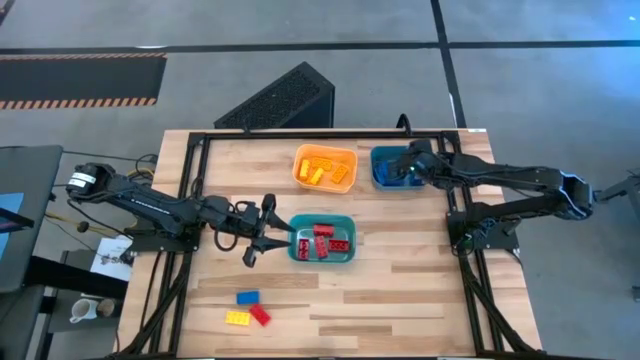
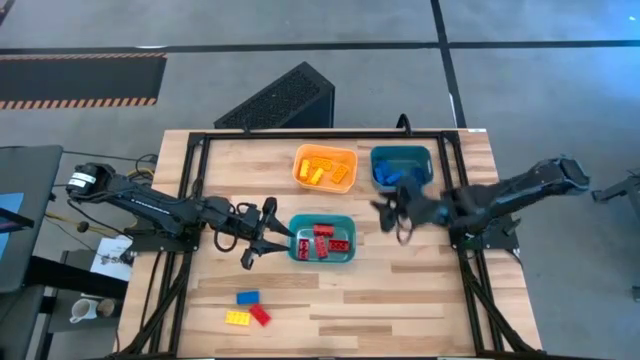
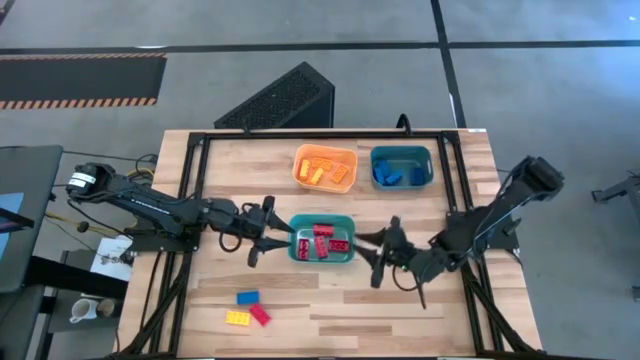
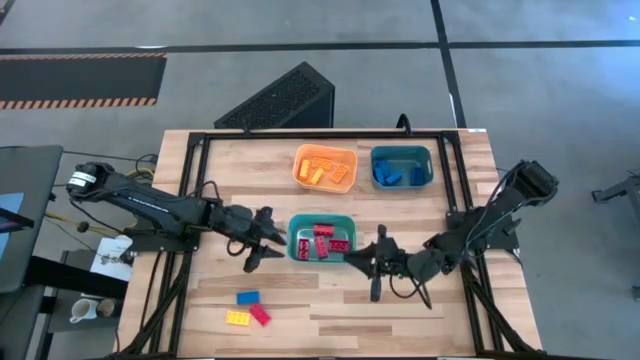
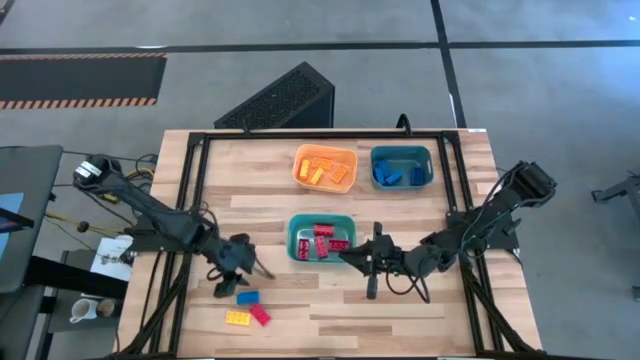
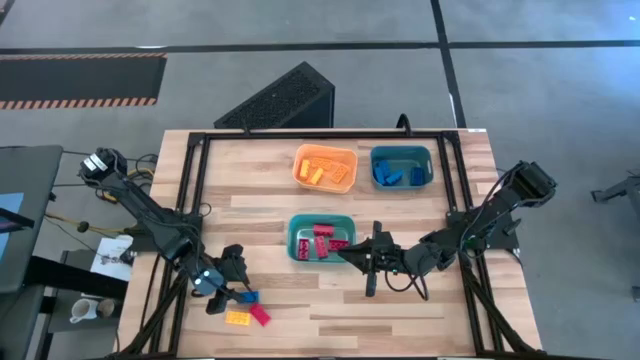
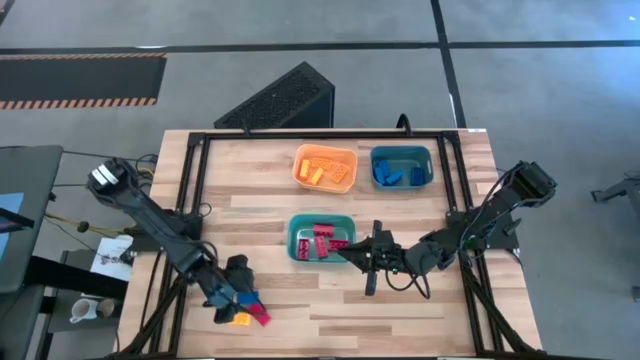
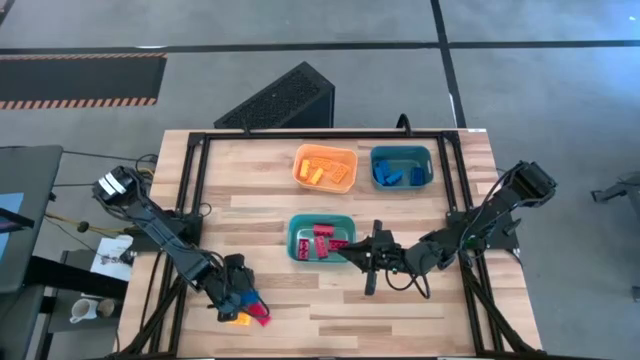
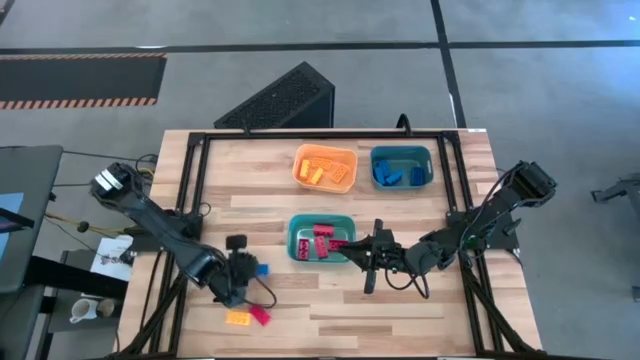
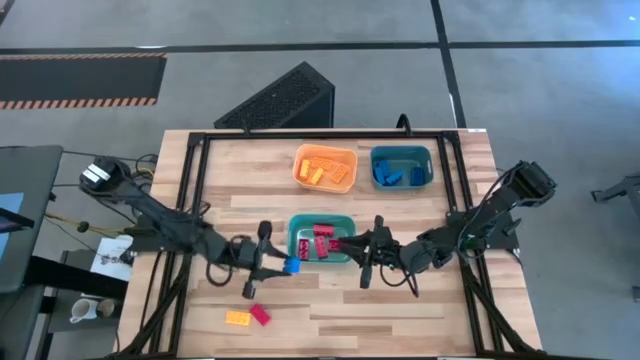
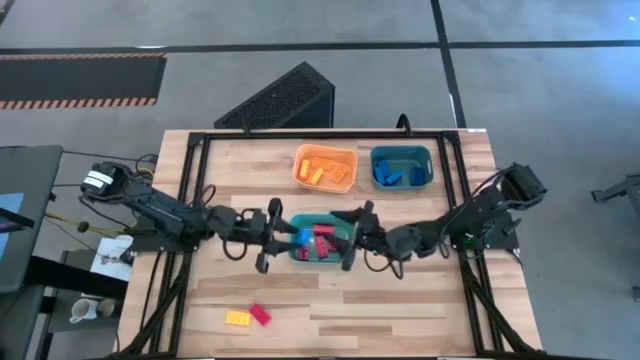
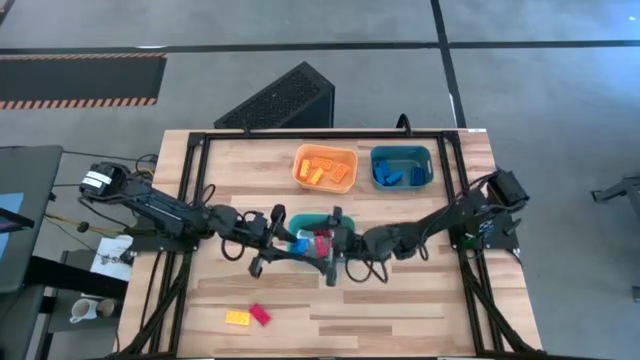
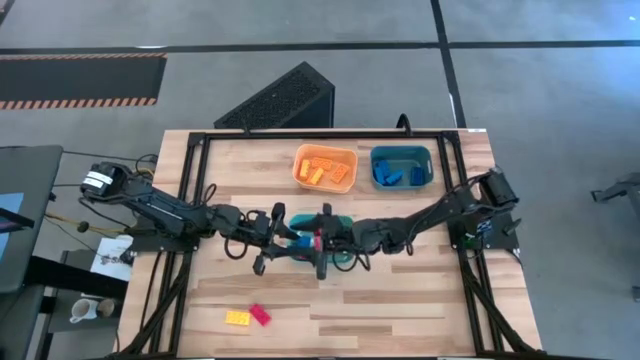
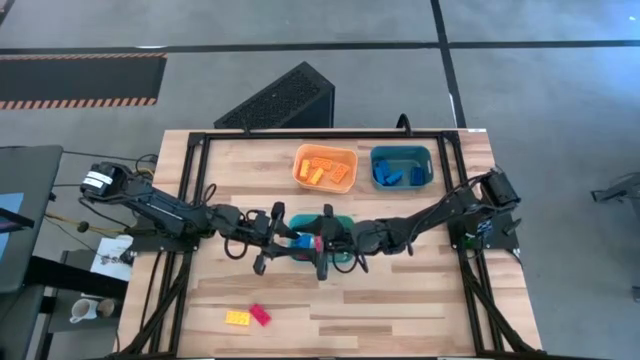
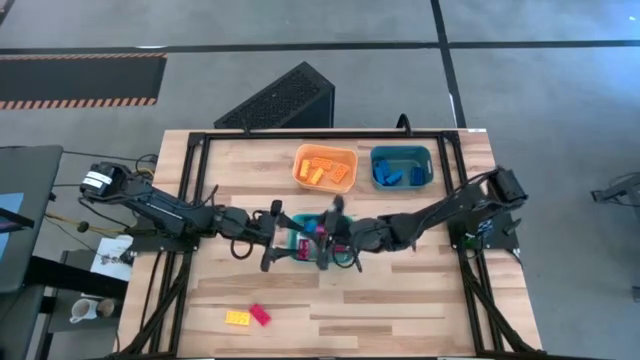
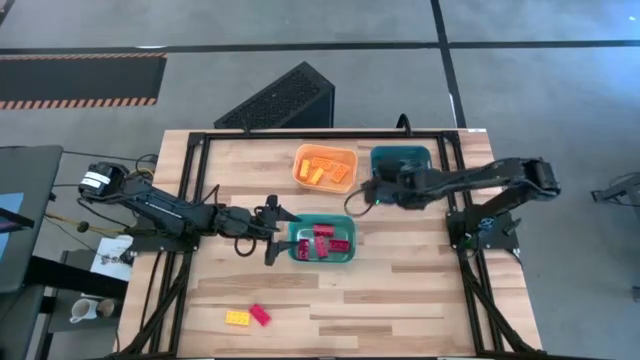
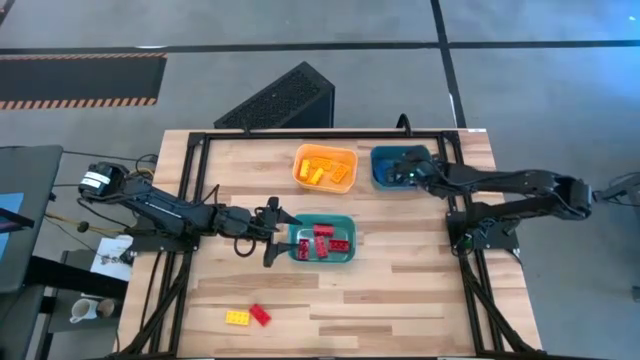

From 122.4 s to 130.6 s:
Task: Sort & place blocks by color
Put the blue game piece into the blue bin

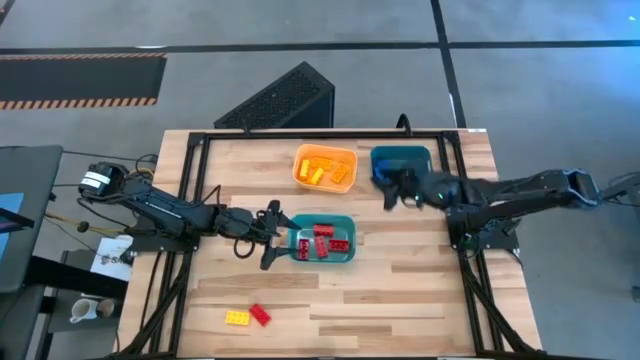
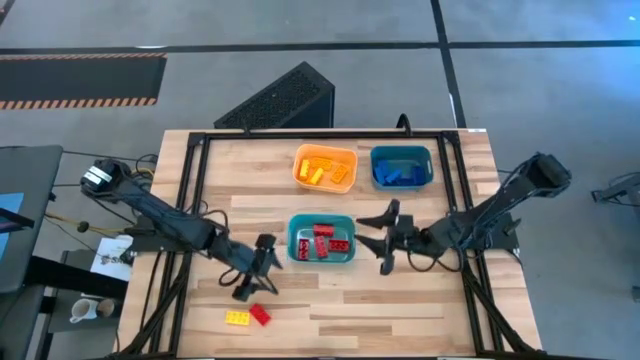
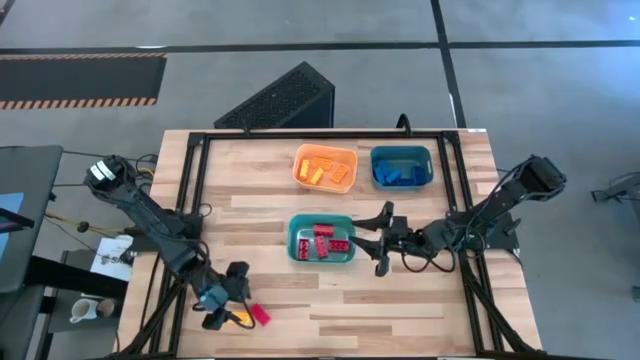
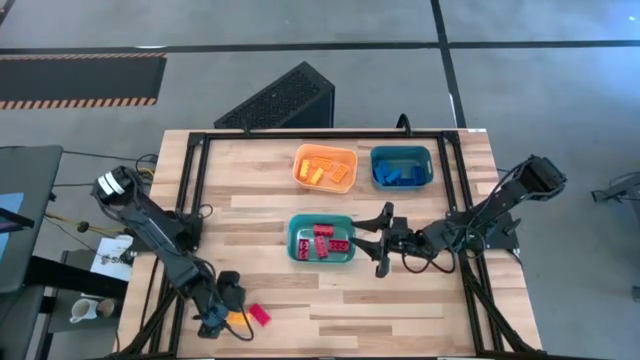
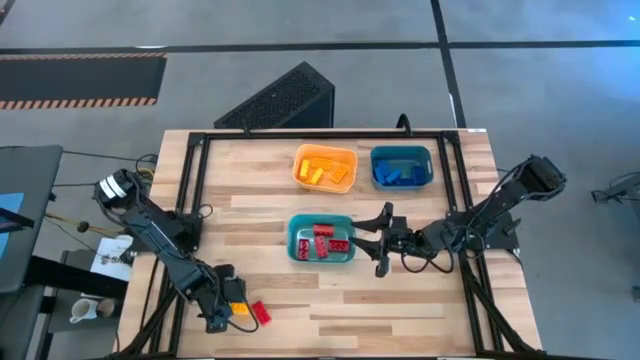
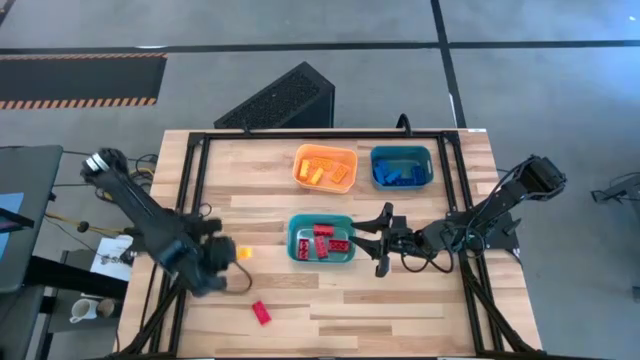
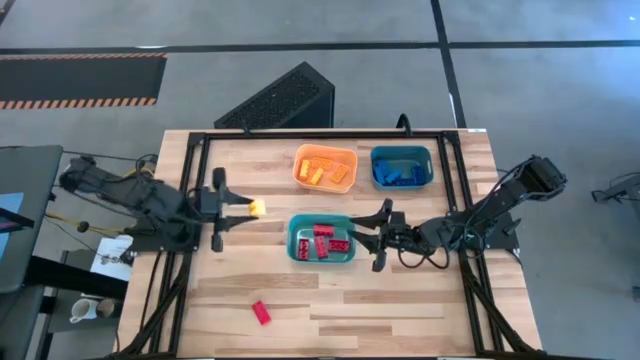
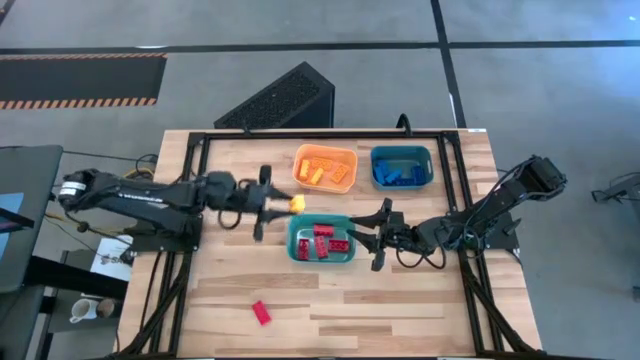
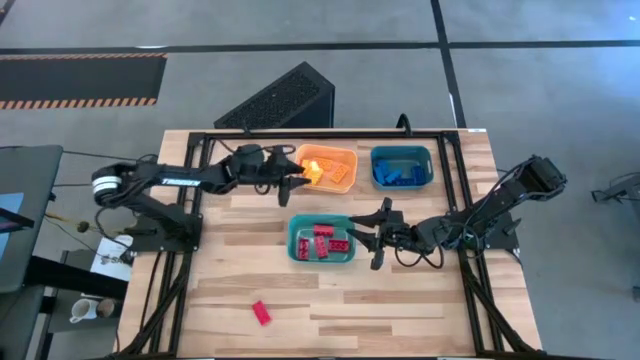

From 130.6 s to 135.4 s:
Put the yellow game piece into the yellow bin

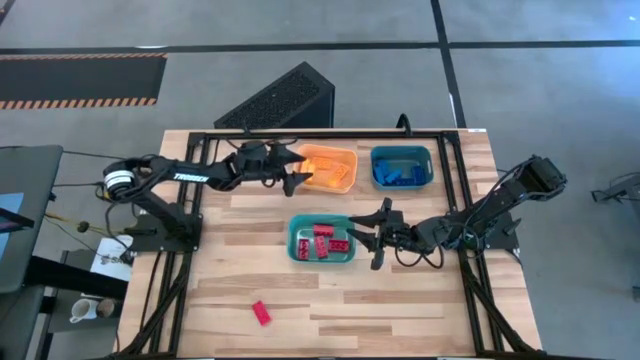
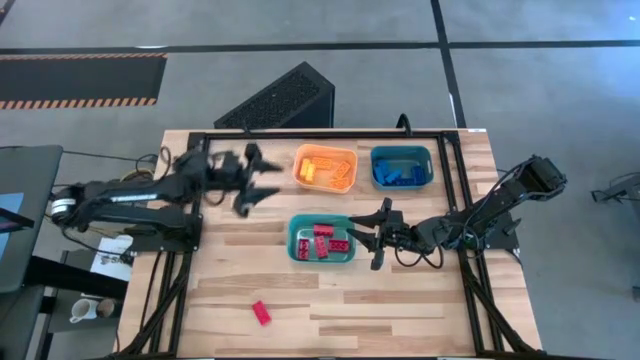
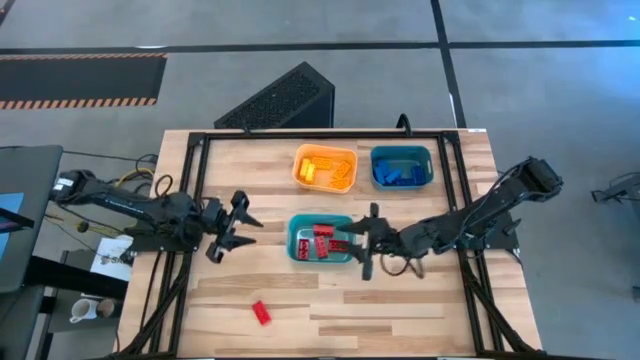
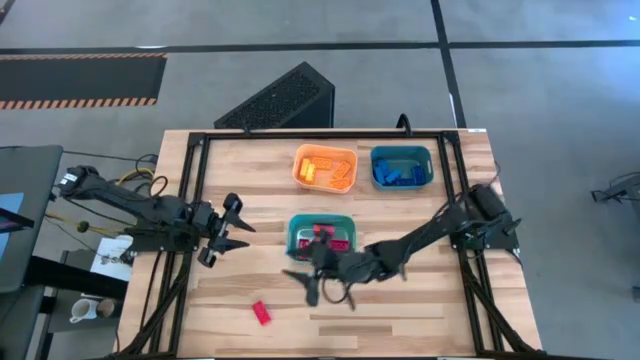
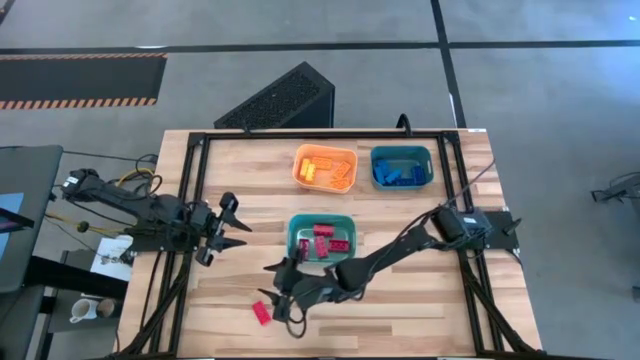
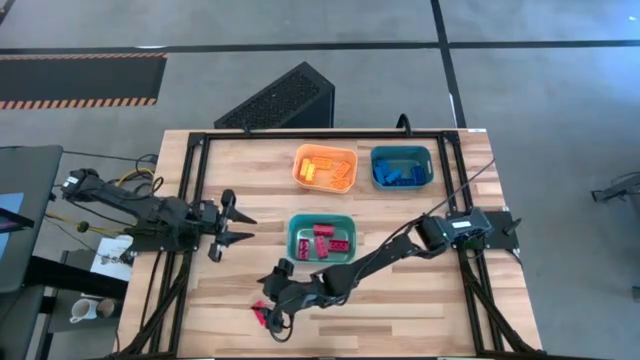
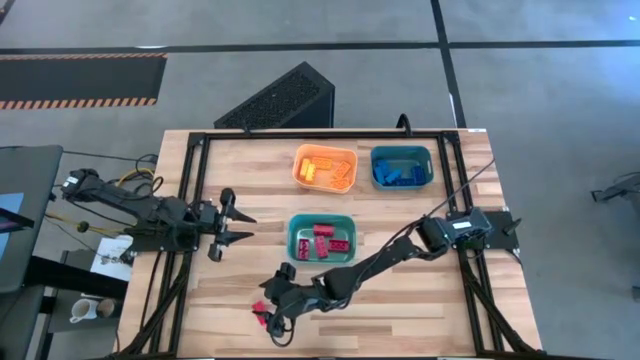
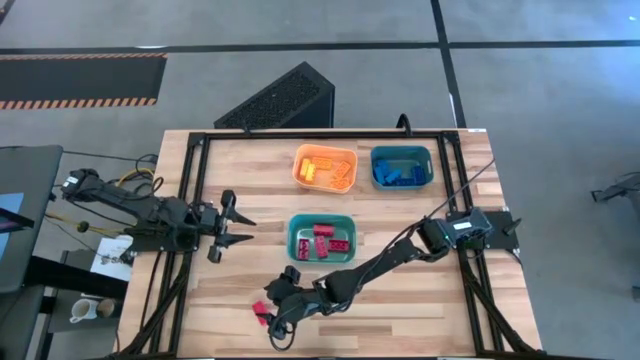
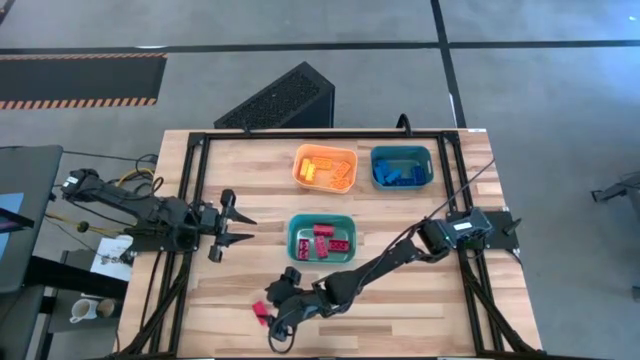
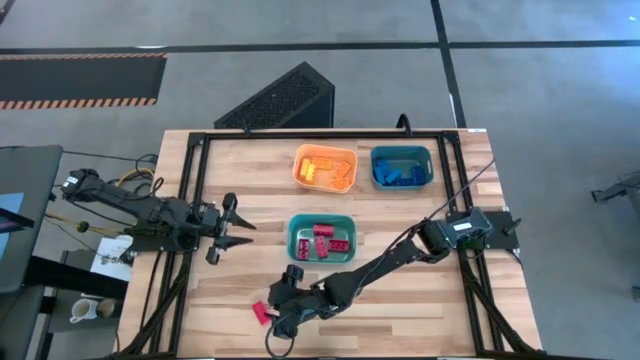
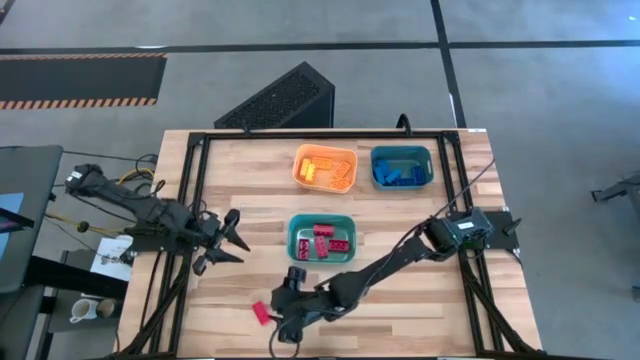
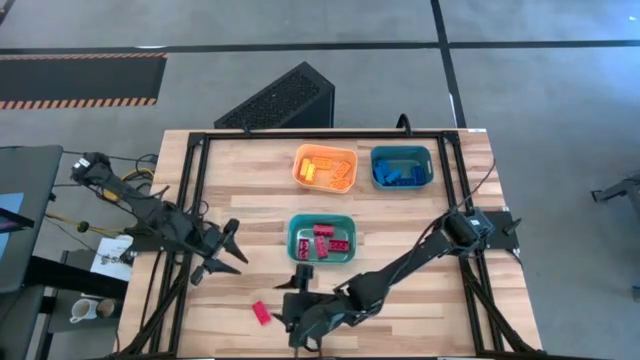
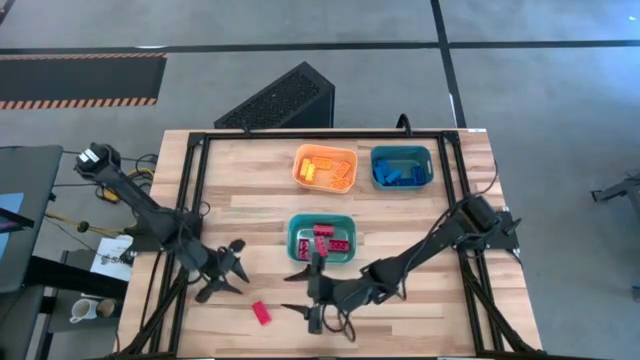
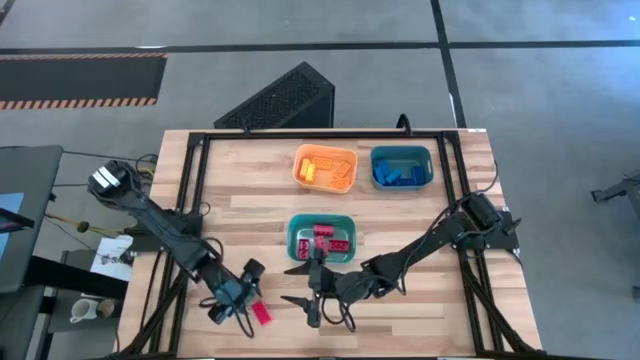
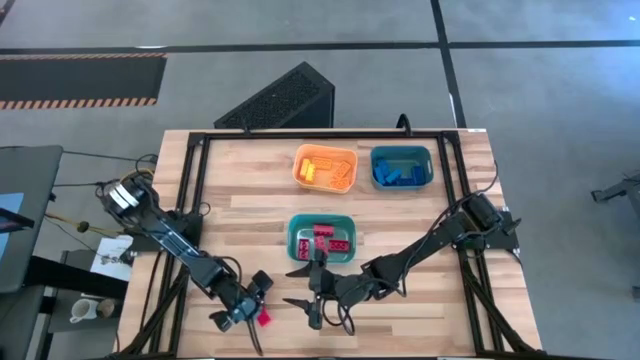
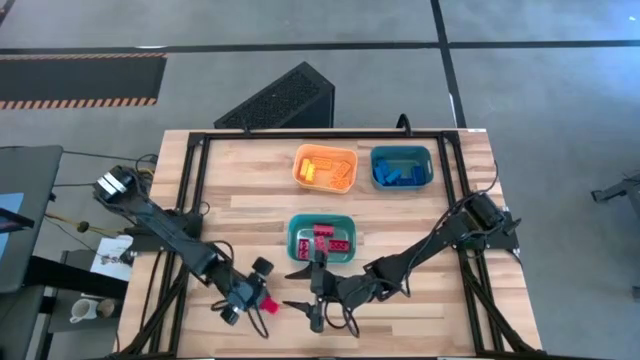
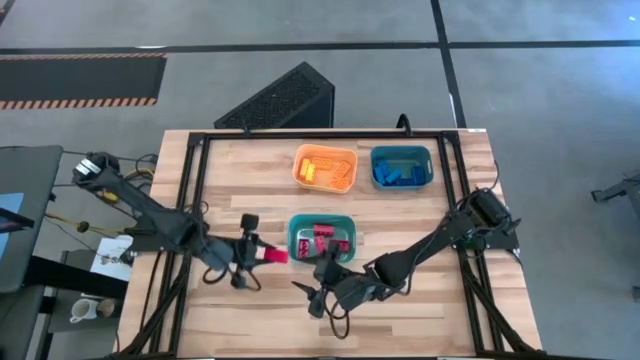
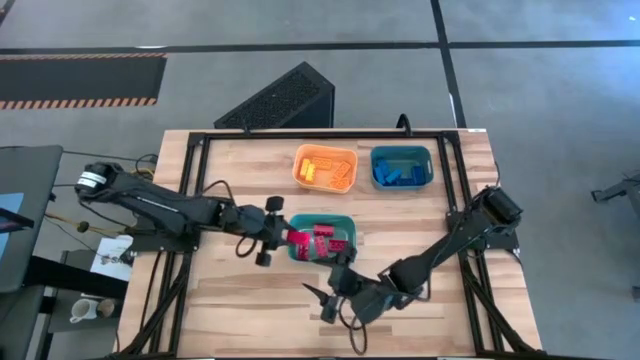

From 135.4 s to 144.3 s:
Put the red game piece into the green bin
